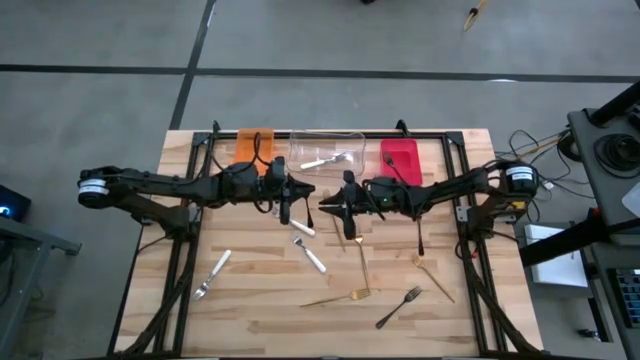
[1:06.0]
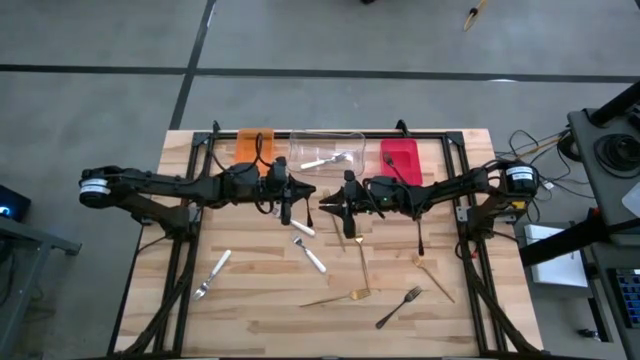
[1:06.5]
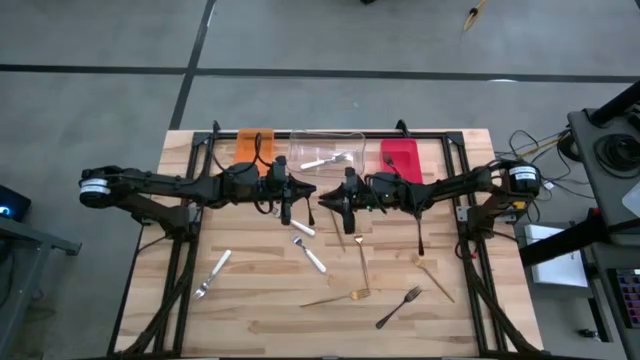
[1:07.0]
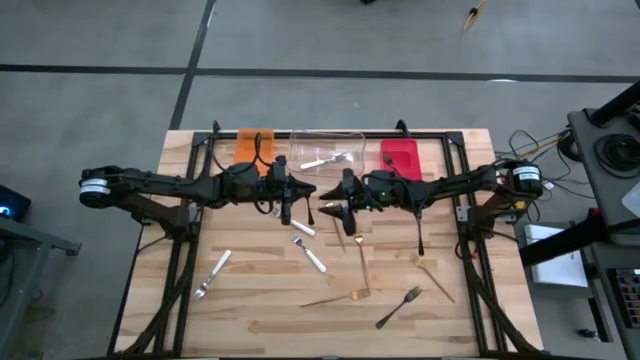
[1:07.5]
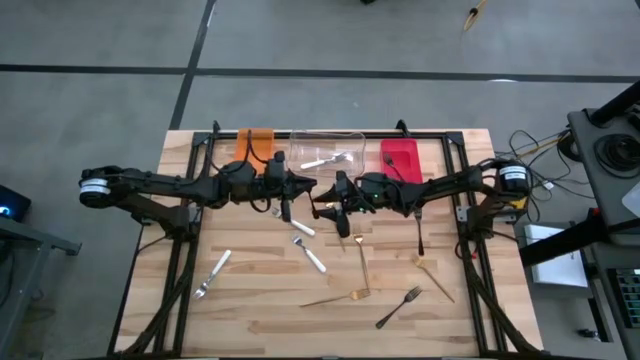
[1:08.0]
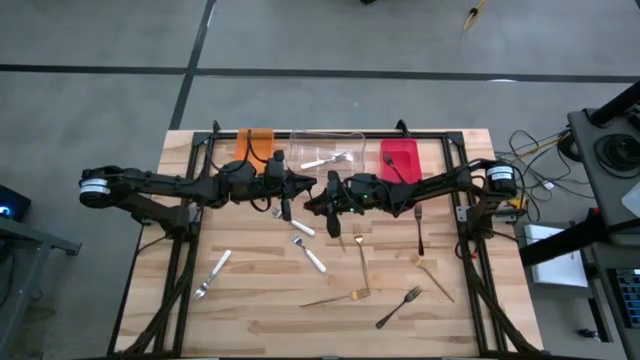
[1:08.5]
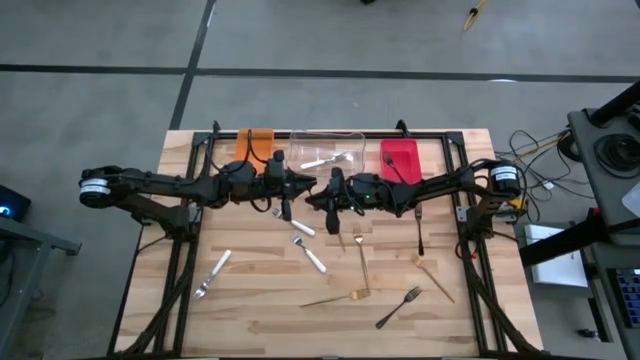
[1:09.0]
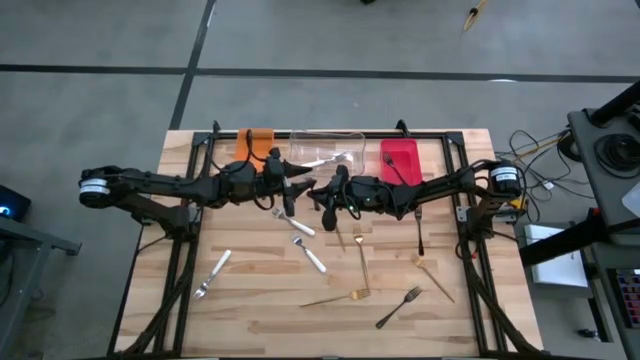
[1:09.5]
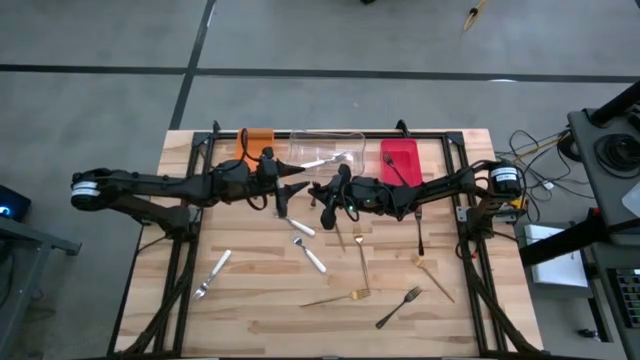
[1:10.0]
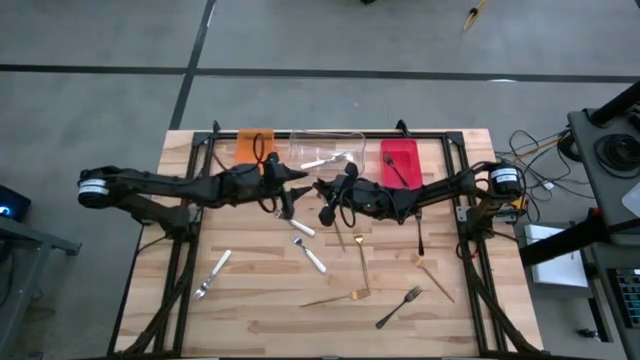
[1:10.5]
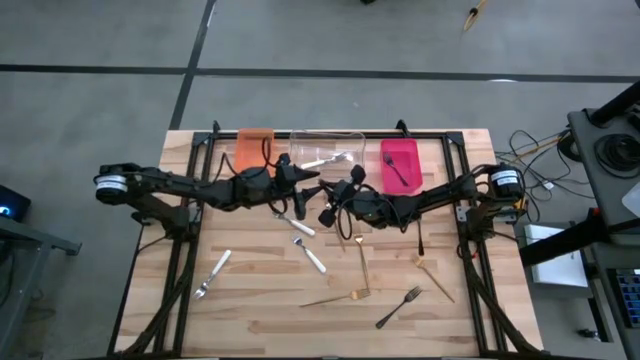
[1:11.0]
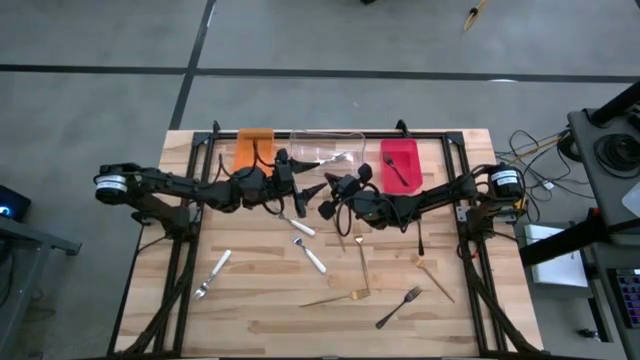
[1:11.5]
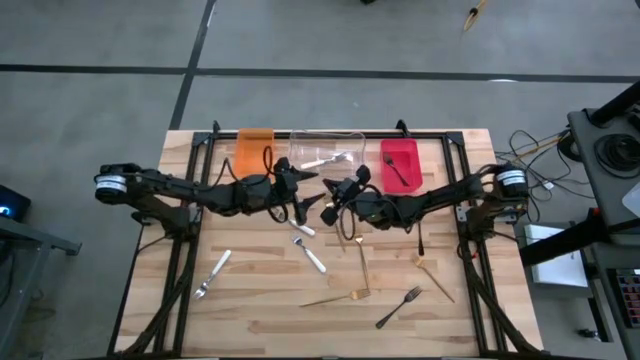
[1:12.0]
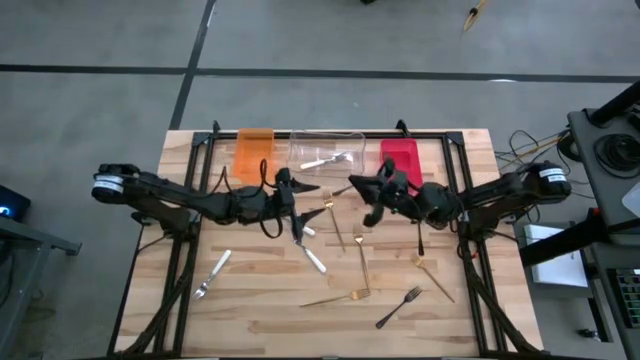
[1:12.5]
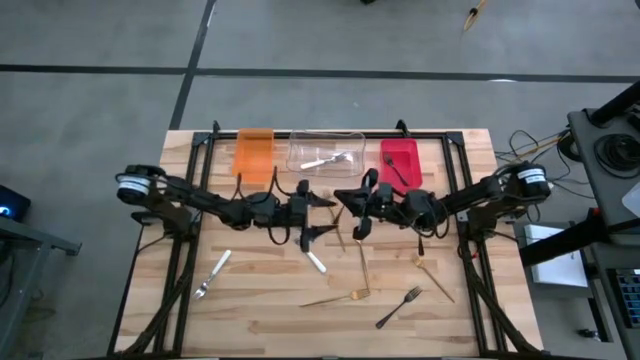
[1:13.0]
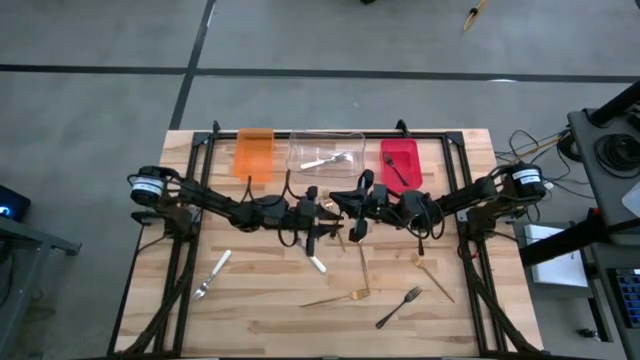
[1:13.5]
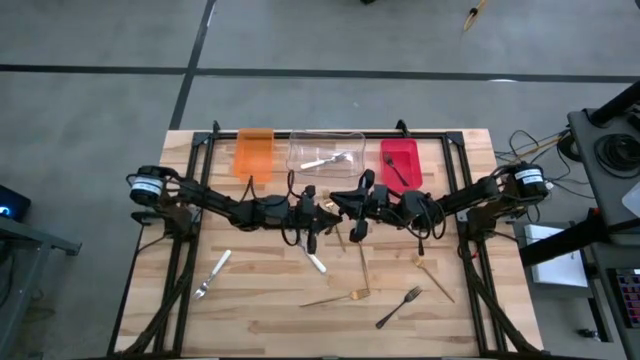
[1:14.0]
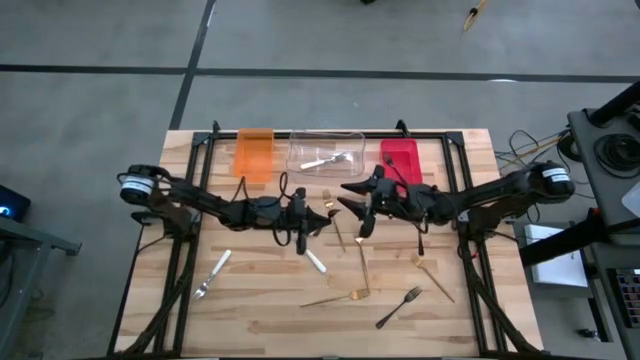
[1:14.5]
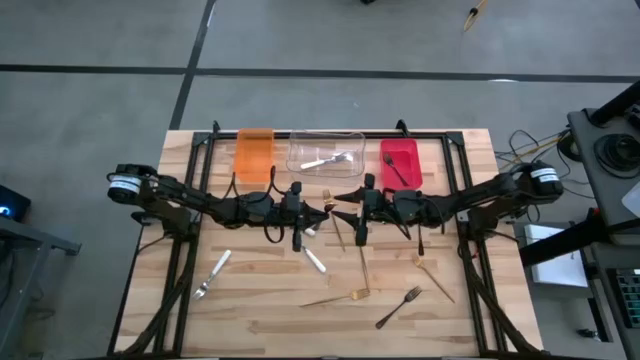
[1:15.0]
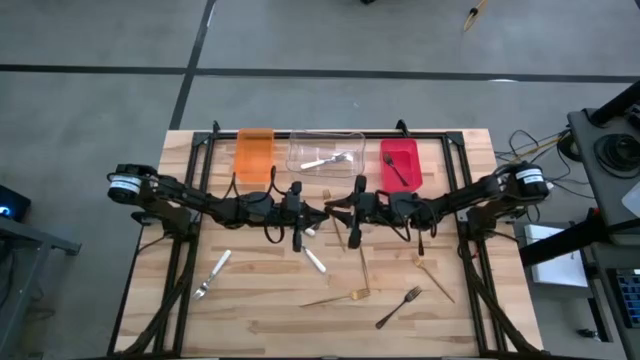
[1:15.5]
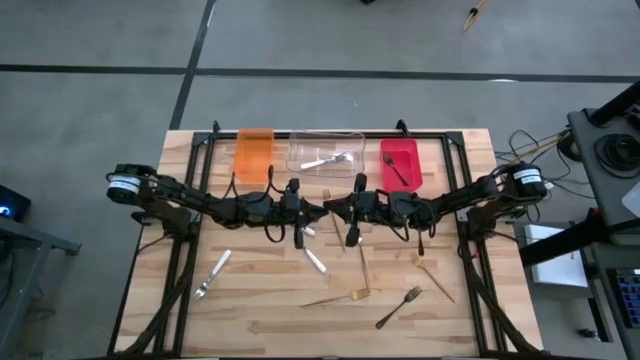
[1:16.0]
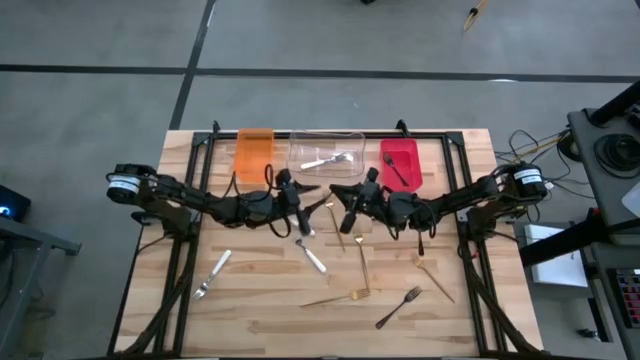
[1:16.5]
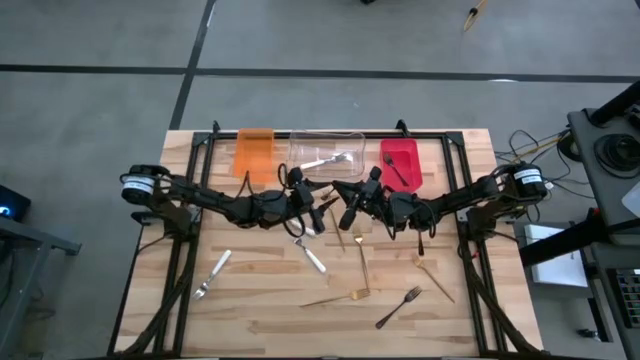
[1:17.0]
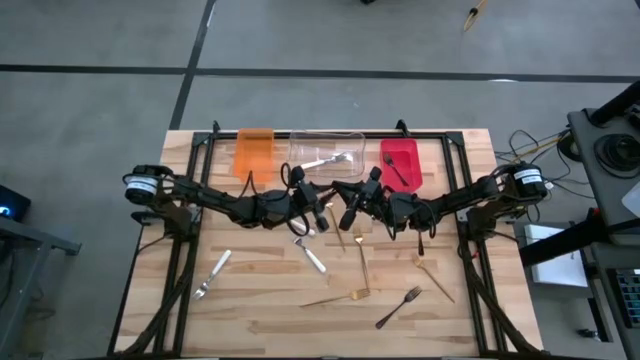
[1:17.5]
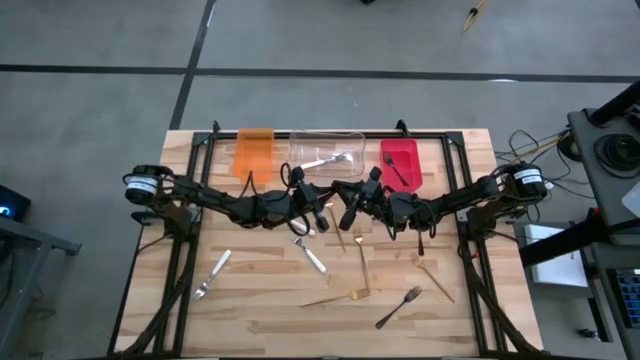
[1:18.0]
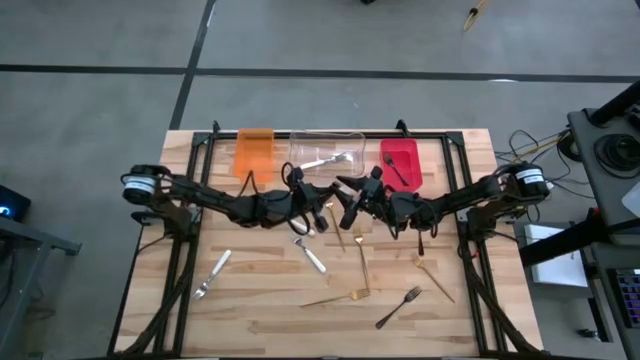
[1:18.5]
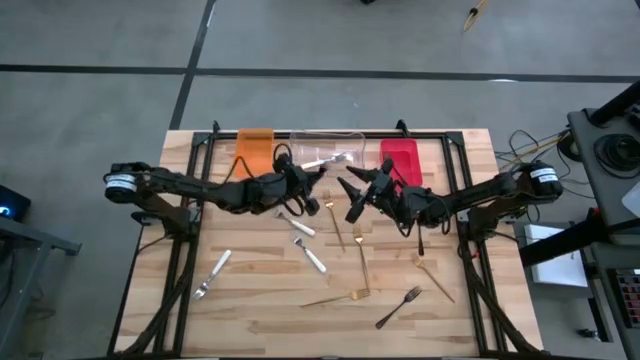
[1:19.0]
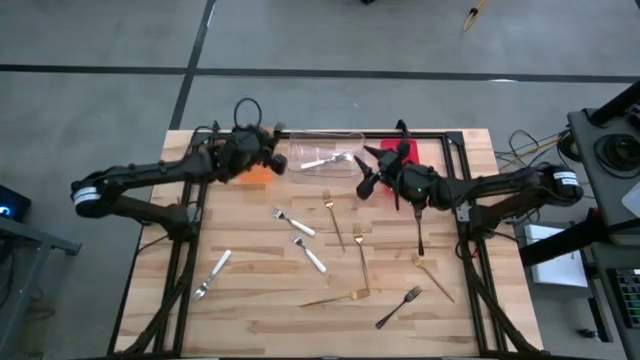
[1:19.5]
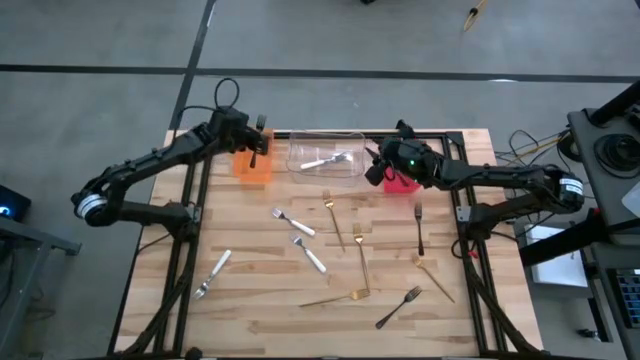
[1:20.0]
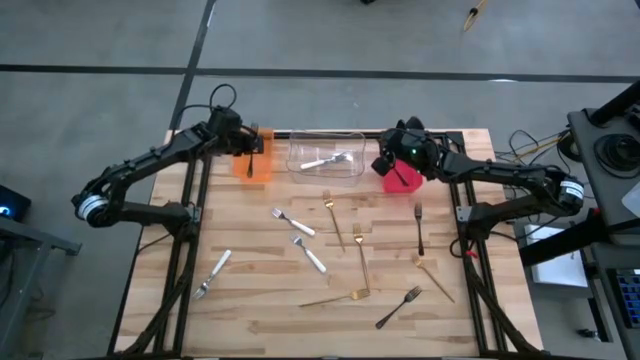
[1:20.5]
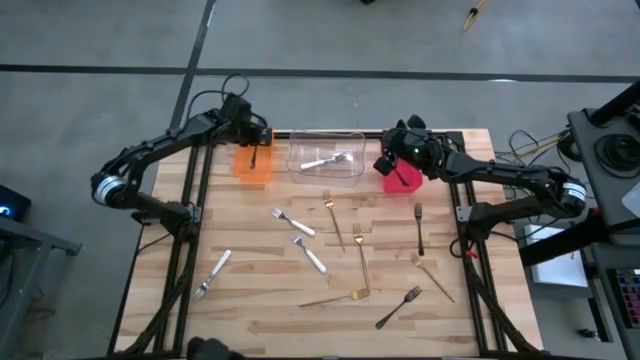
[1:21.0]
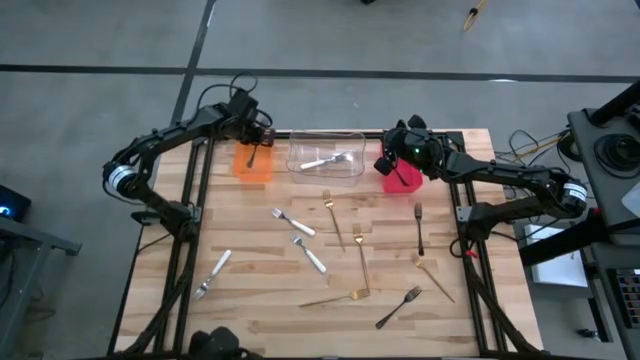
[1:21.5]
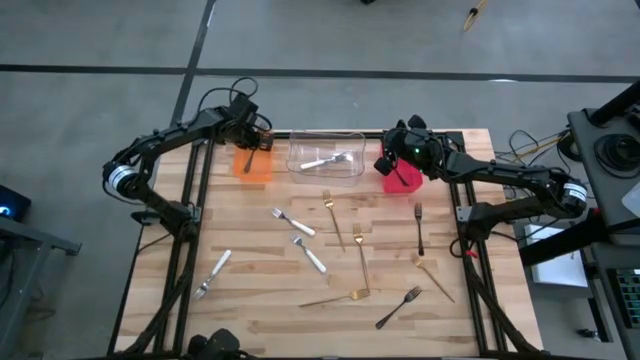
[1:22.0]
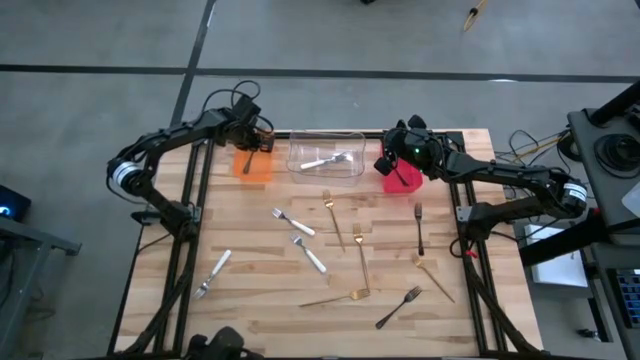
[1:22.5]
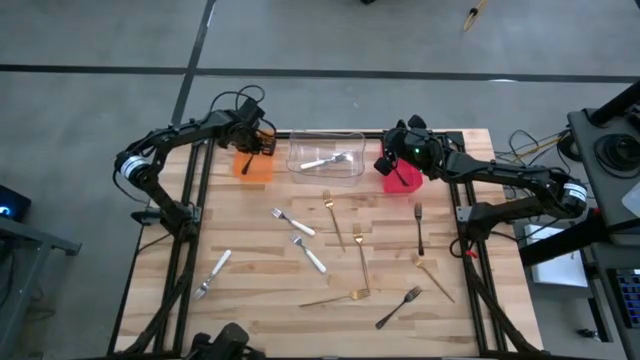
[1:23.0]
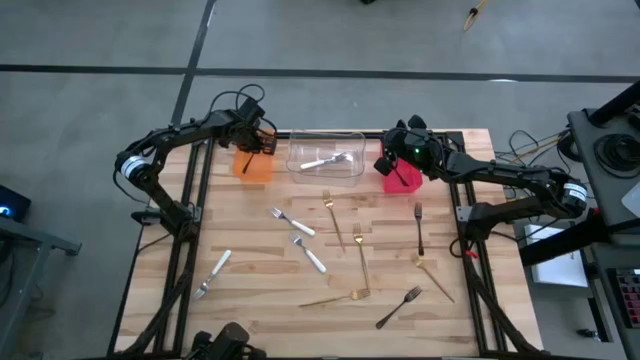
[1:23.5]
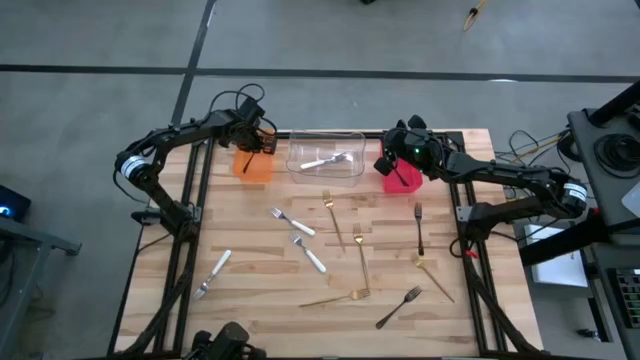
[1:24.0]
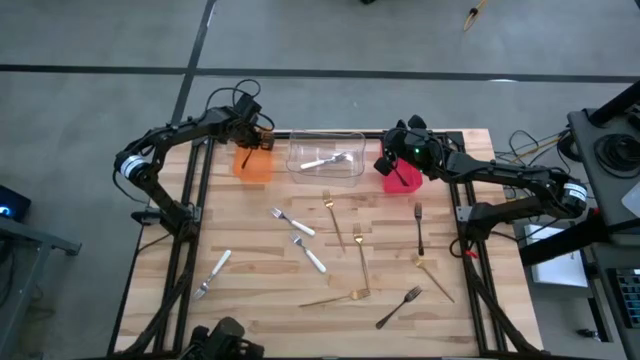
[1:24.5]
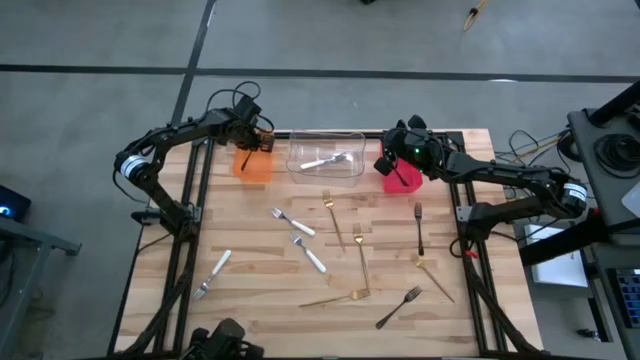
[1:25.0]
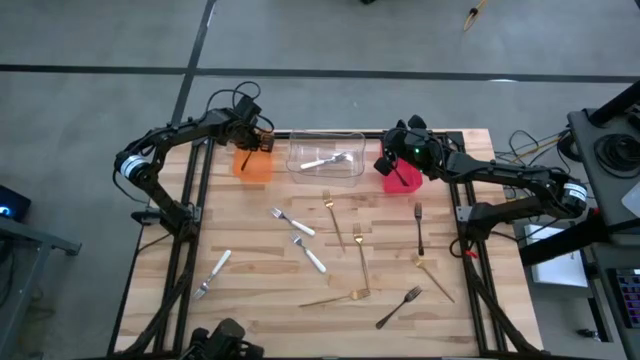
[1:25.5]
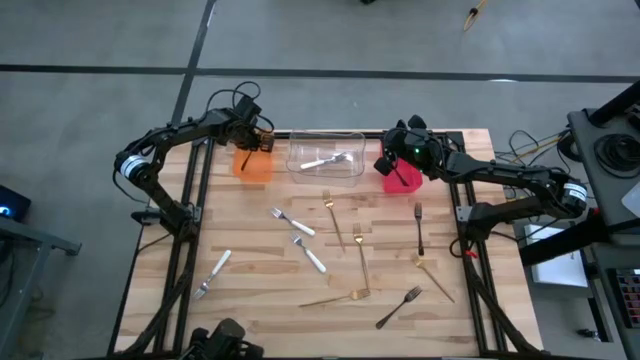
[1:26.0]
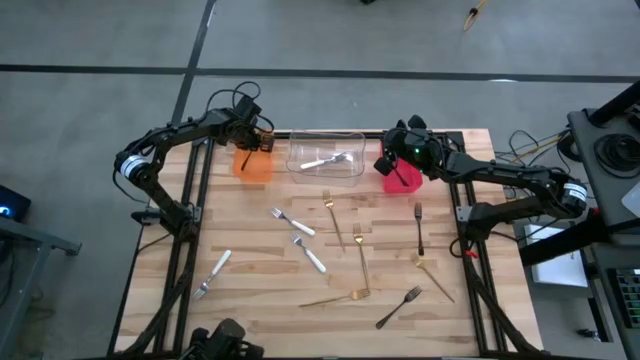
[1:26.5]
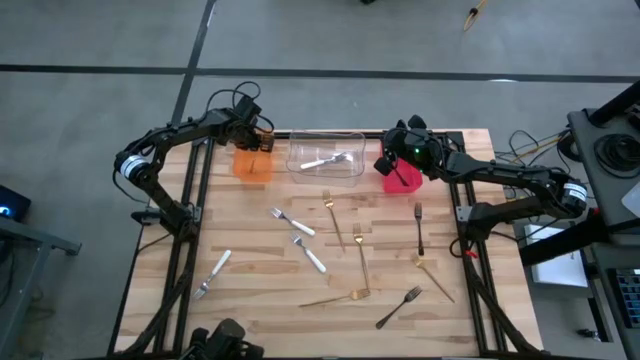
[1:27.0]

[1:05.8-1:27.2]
Task: Sort silverware by color (type)
Put the black fork into the orange bin
